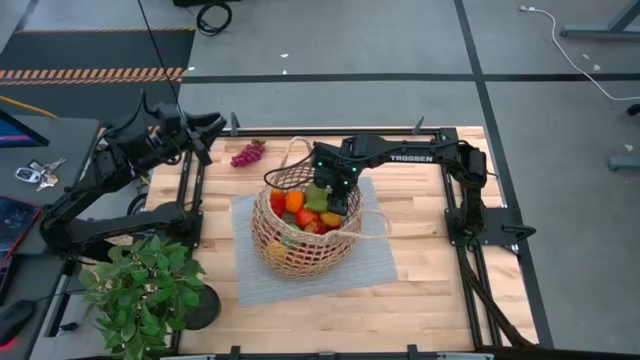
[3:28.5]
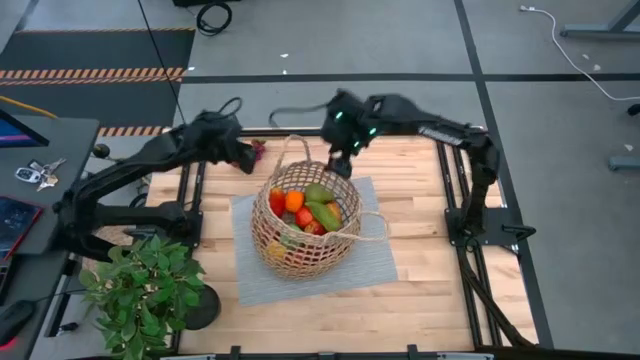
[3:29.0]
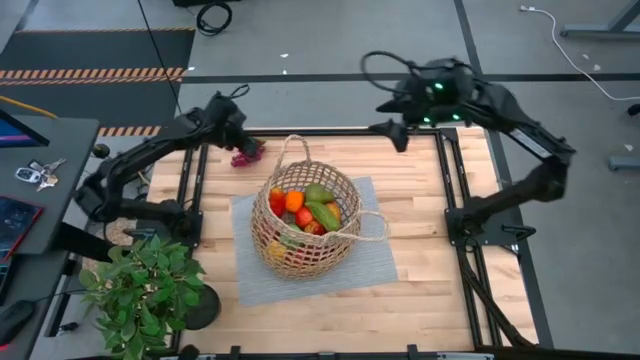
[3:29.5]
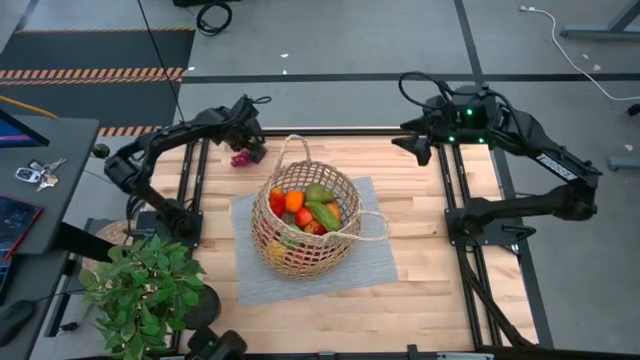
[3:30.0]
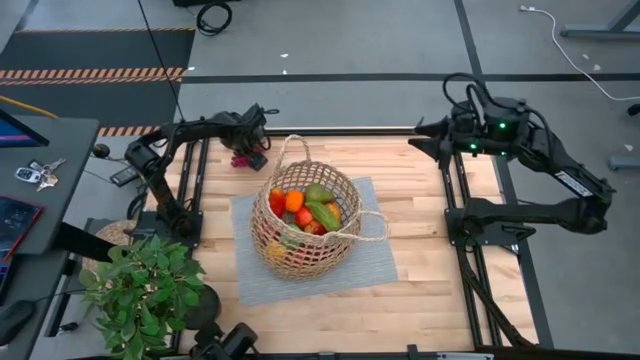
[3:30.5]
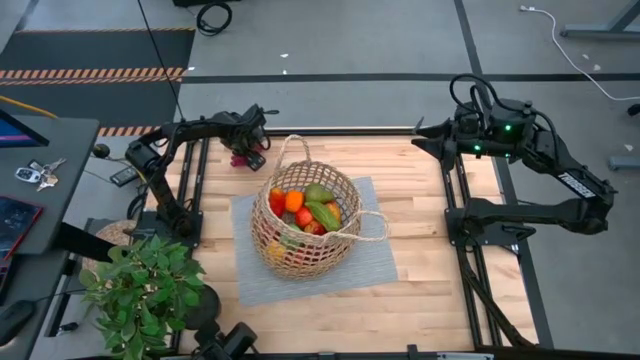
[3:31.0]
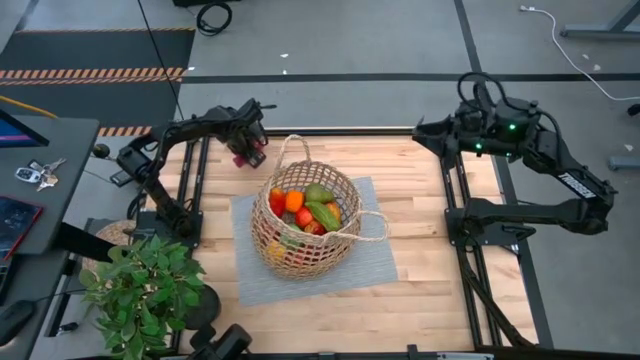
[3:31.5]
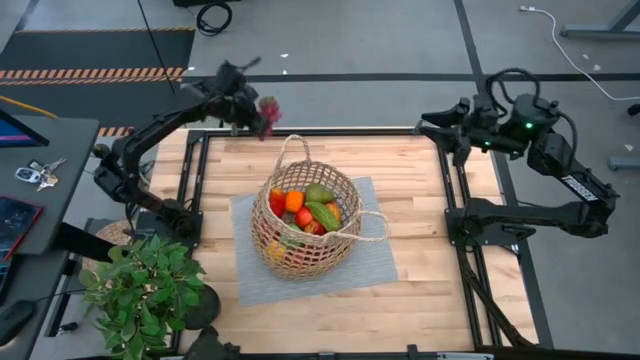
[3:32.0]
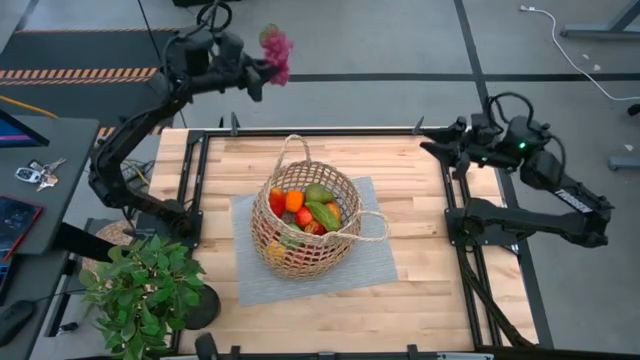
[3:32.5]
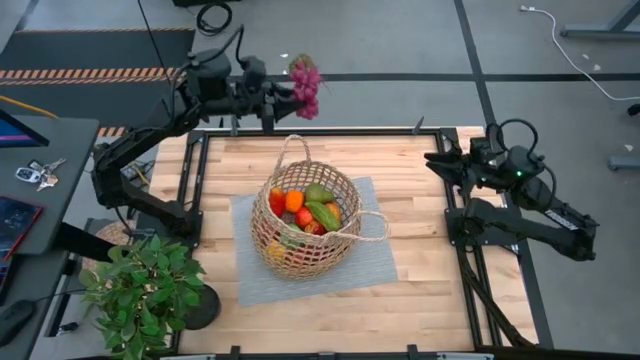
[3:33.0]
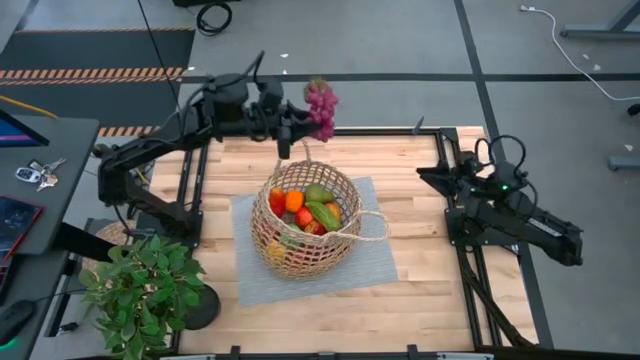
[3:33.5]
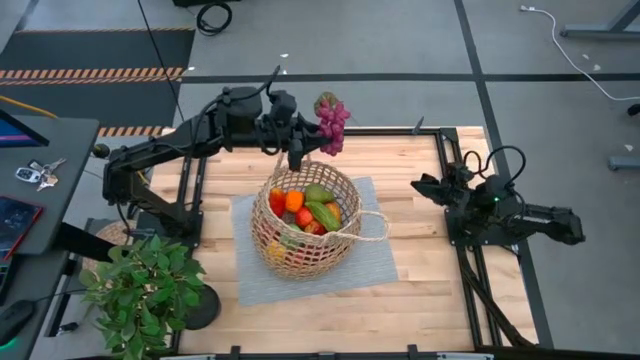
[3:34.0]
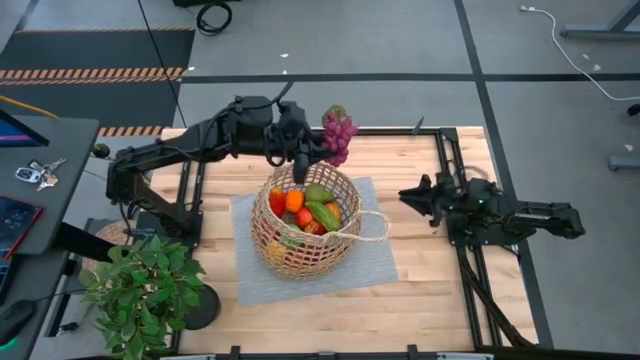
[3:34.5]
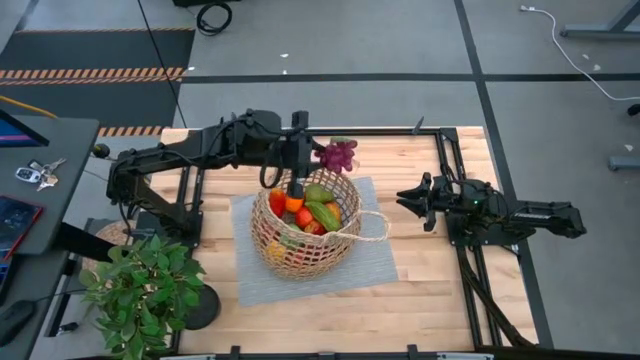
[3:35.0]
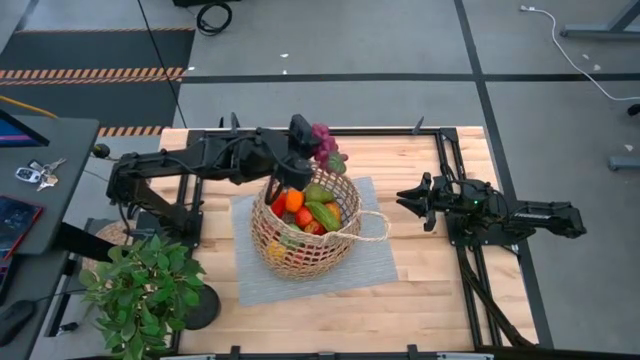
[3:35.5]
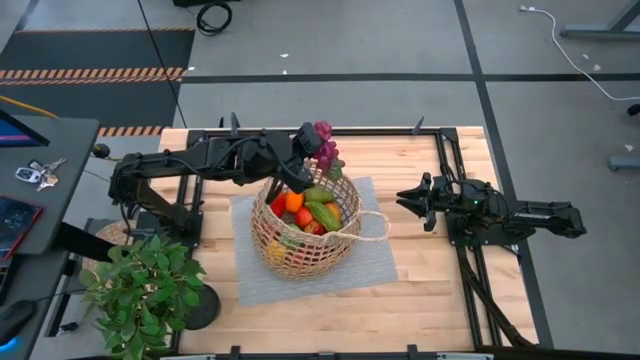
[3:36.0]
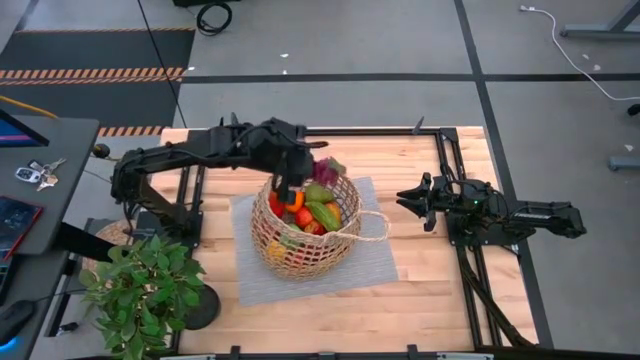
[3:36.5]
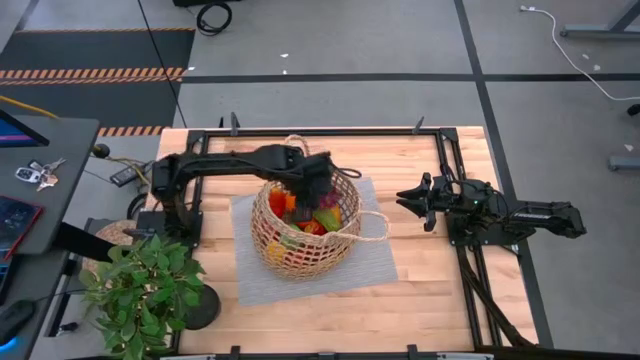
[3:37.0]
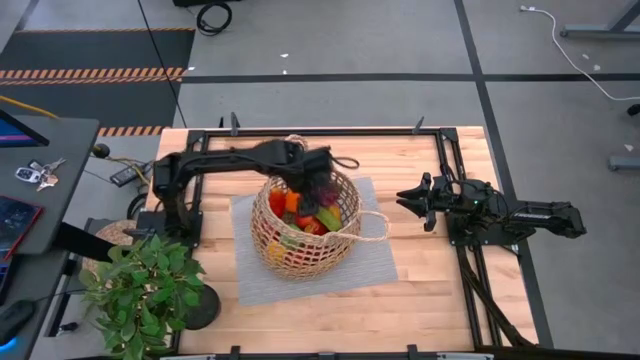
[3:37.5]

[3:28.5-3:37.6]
Task: Build produce basket
Put the purple grapes into the brown woven basket

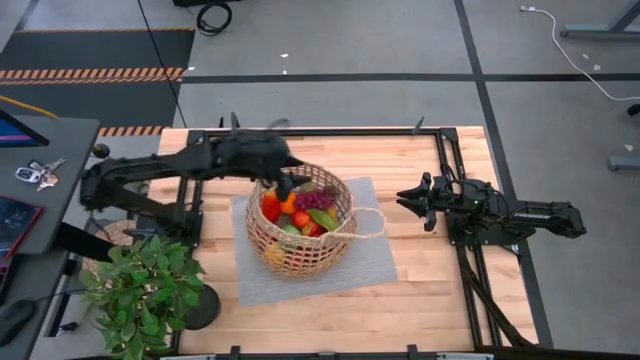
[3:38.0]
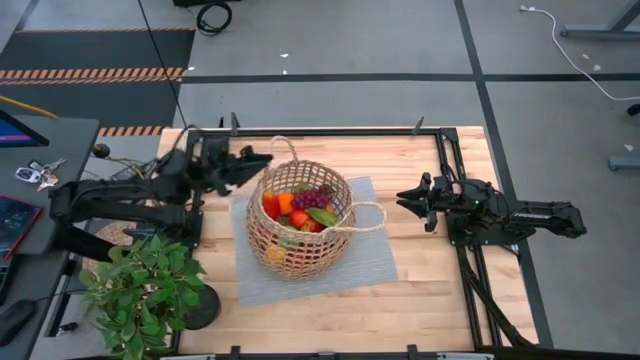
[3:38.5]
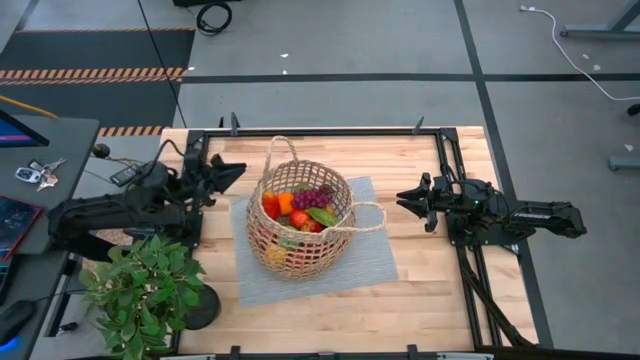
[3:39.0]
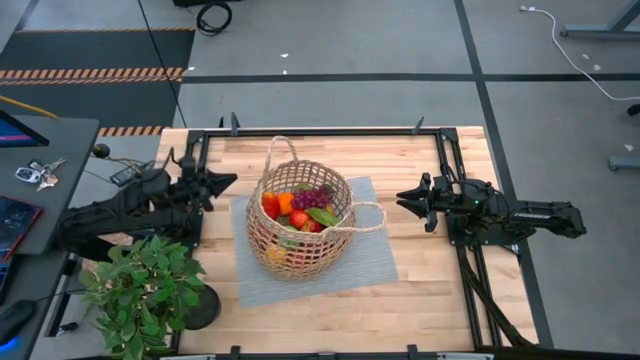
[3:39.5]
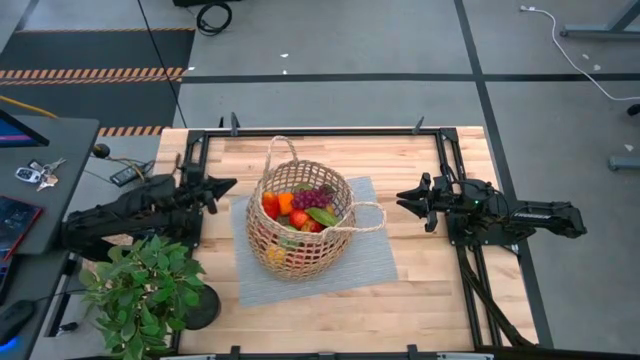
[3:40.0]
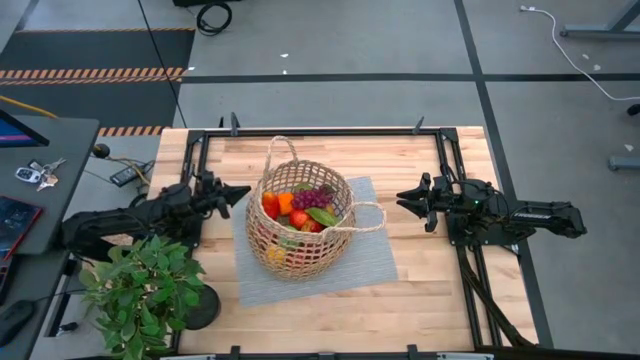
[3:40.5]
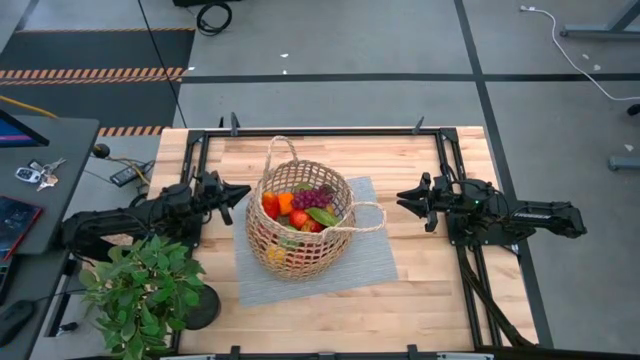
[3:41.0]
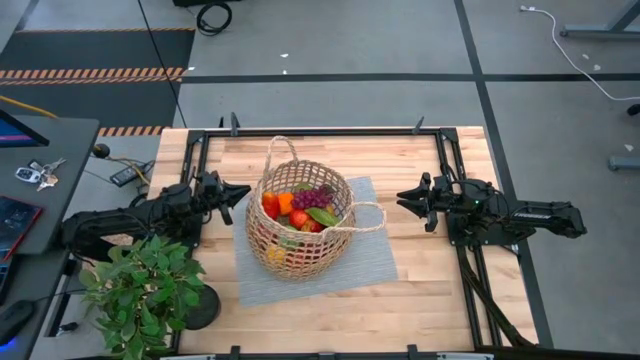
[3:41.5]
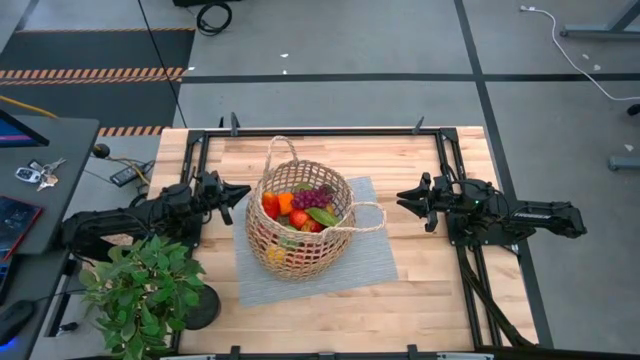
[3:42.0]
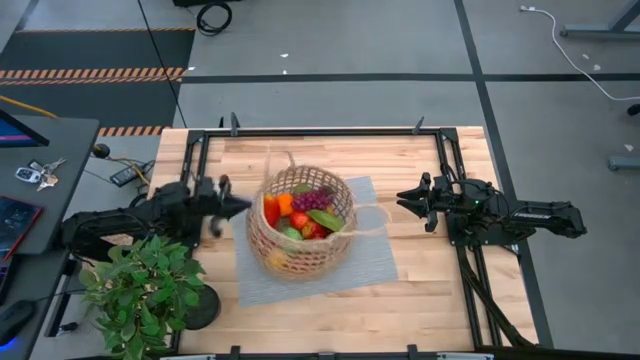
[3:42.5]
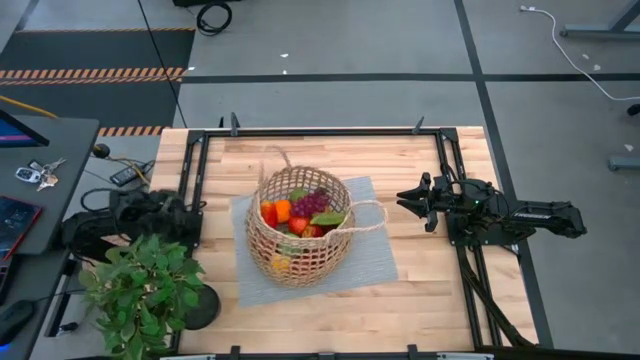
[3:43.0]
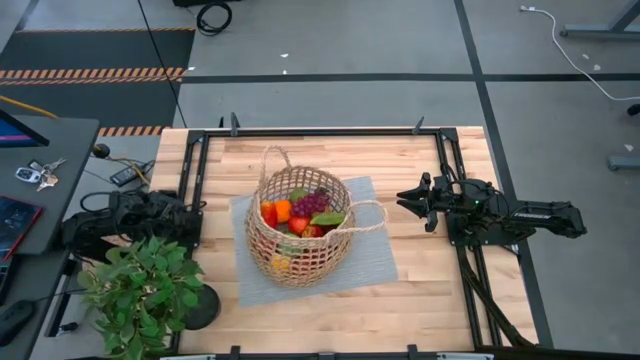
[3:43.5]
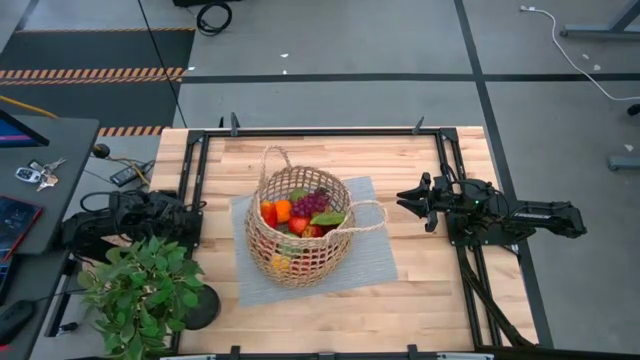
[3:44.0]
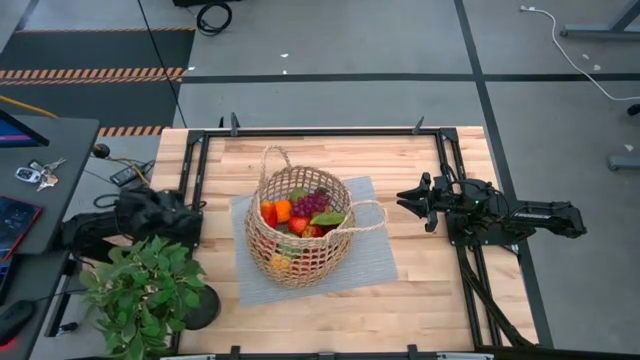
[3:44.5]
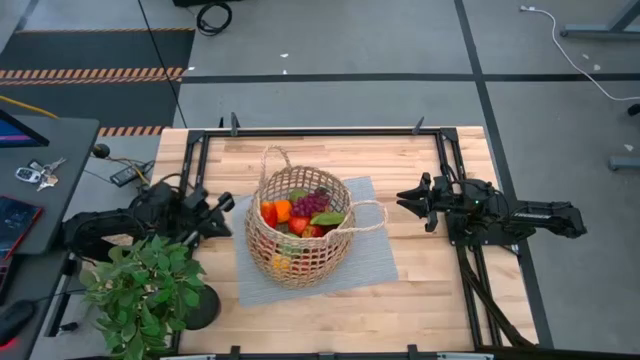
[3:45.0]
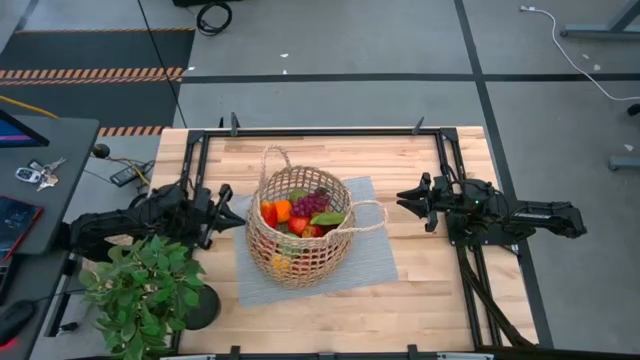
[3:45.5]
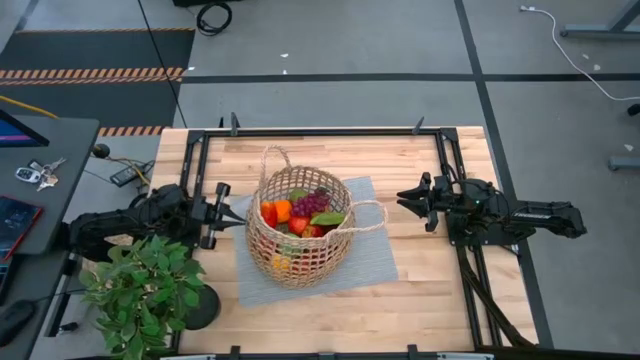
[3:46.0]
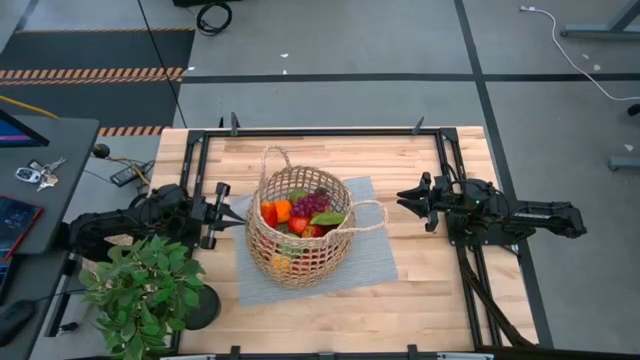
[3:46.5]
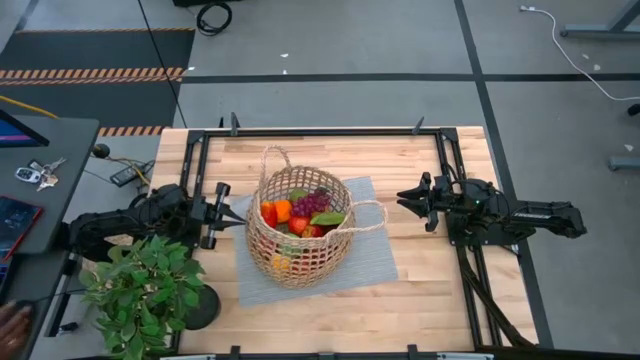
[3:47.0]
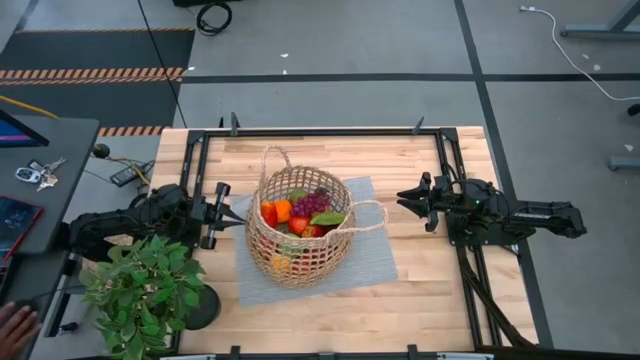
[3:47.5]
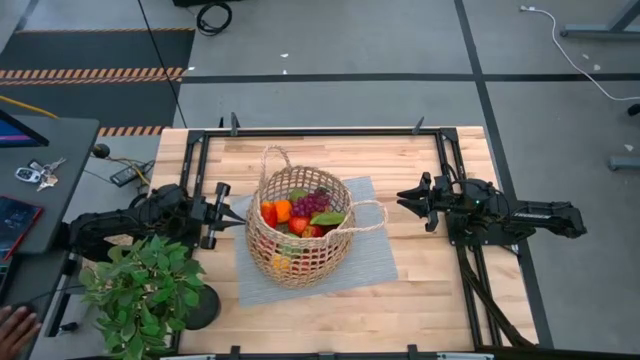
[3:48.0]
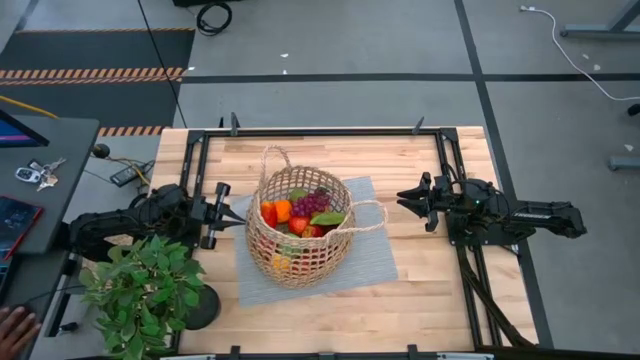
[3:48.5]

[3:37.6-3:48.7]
Return to Home Position

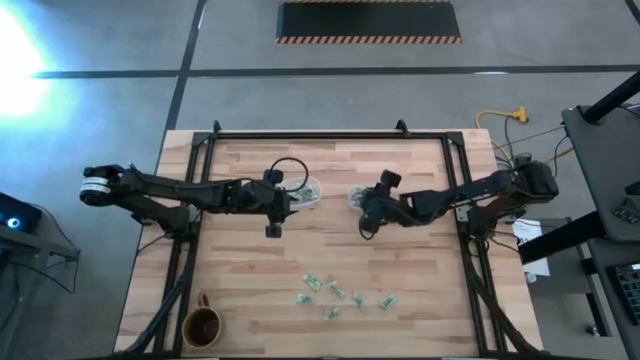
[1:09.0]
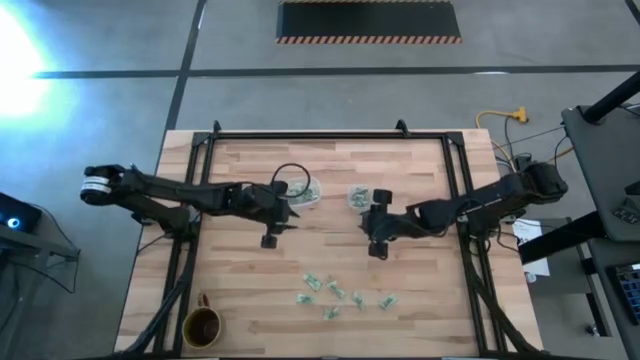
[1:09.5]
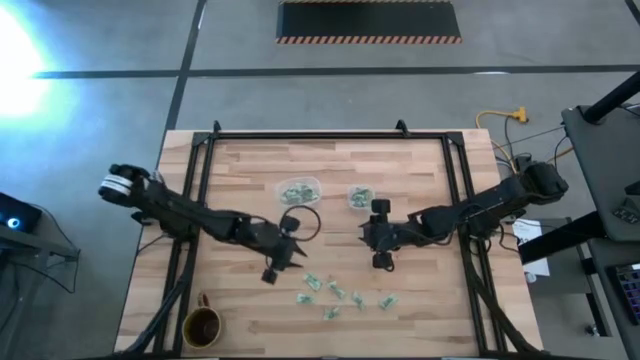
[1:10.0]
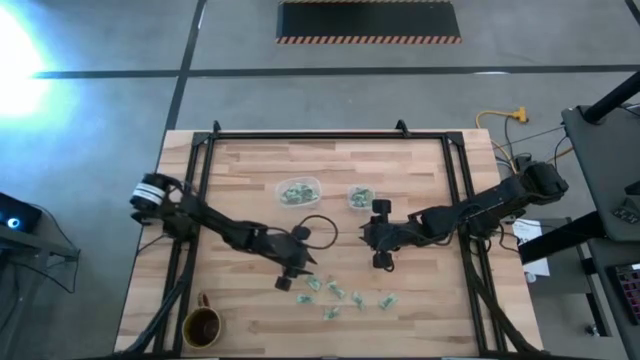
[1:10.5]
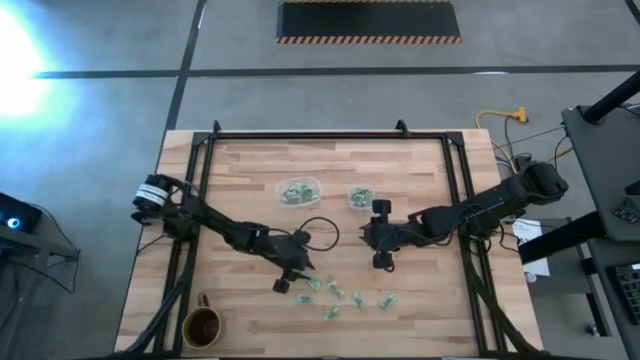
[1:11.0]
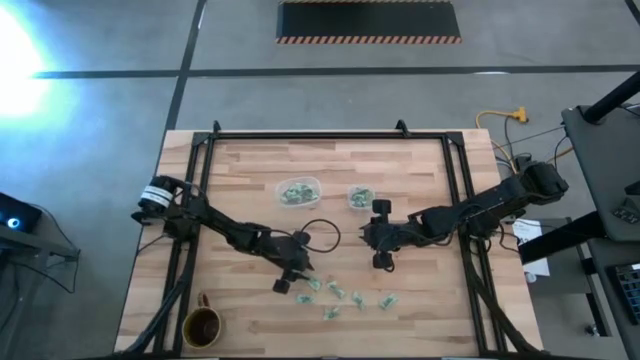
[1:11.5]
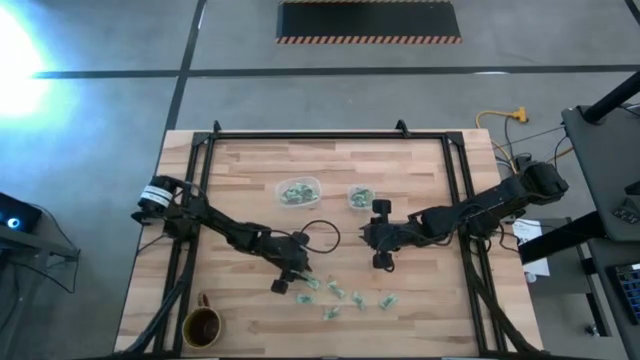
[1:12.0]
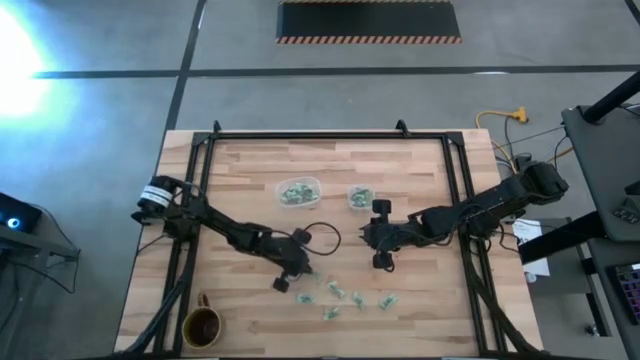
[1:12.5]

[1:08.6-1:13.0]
Task: Pick and place Stevia / Truvia into bins
Put the stevia packet into the transparent oval container
